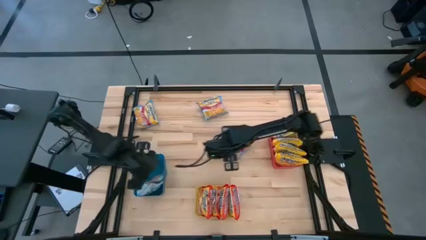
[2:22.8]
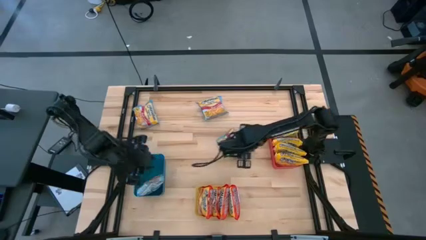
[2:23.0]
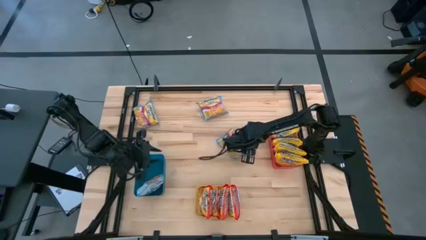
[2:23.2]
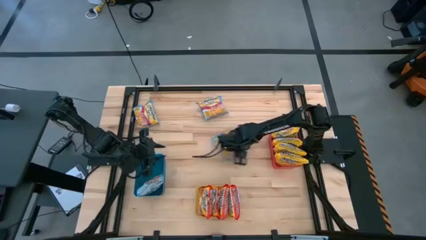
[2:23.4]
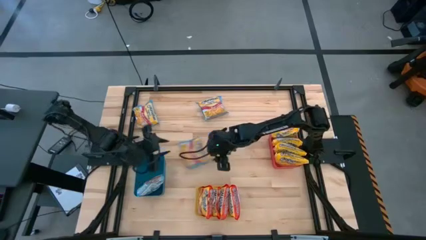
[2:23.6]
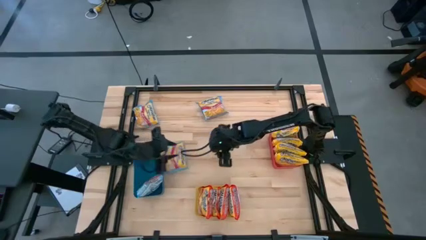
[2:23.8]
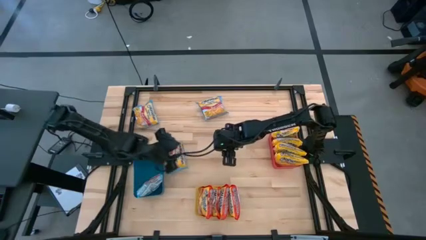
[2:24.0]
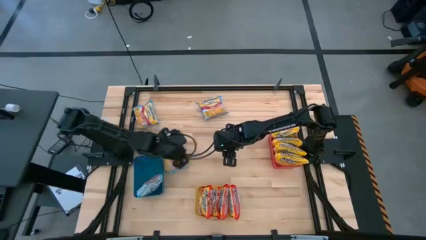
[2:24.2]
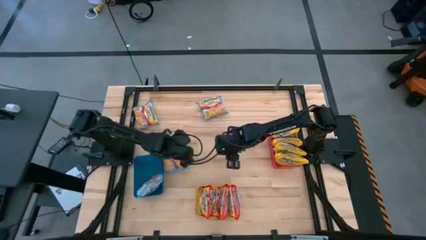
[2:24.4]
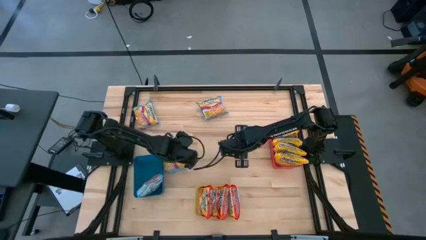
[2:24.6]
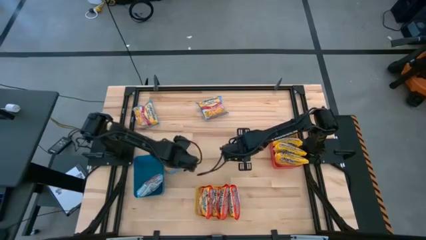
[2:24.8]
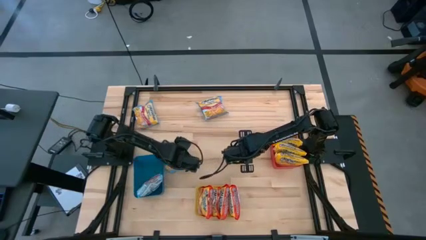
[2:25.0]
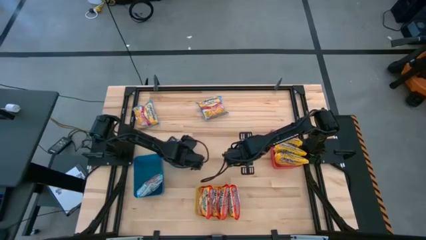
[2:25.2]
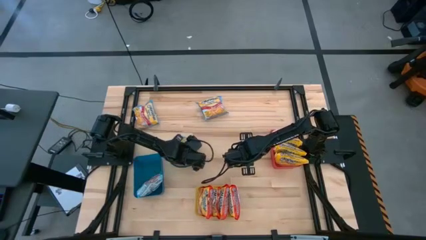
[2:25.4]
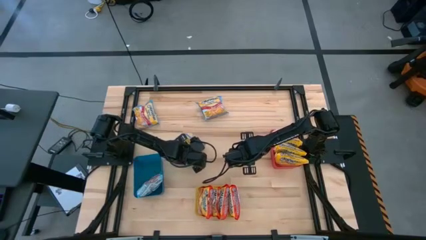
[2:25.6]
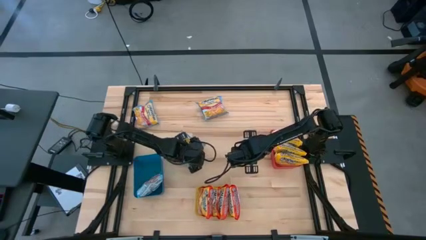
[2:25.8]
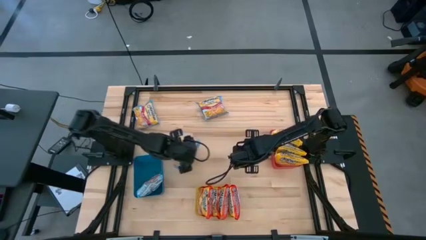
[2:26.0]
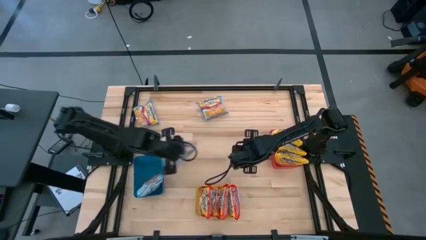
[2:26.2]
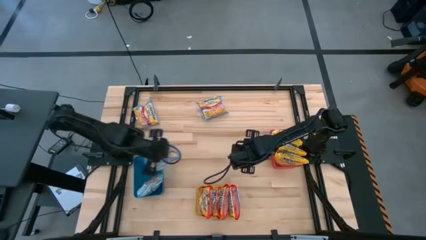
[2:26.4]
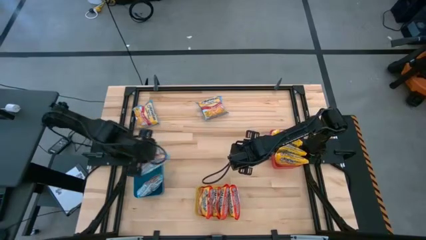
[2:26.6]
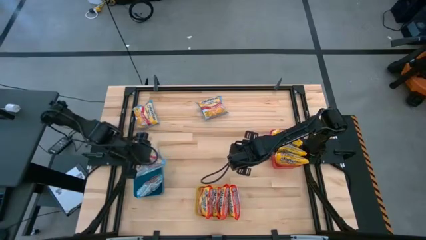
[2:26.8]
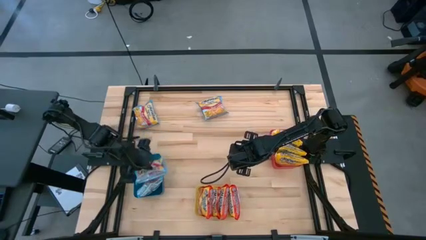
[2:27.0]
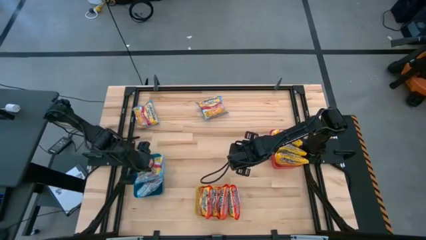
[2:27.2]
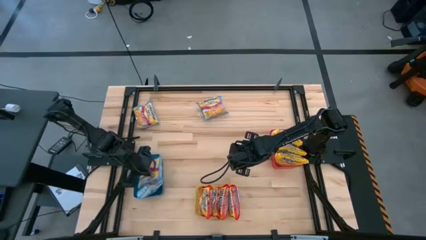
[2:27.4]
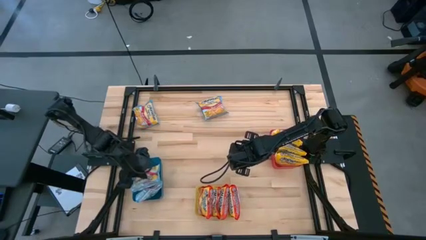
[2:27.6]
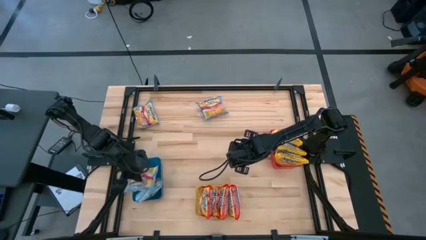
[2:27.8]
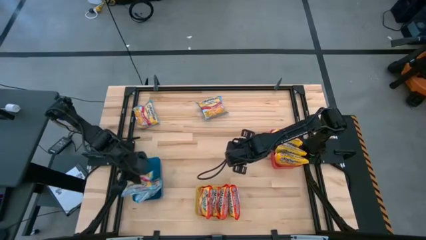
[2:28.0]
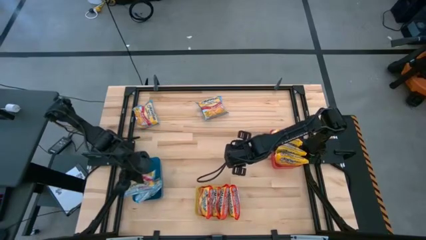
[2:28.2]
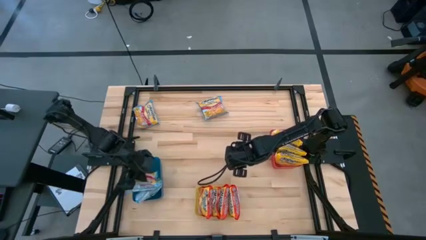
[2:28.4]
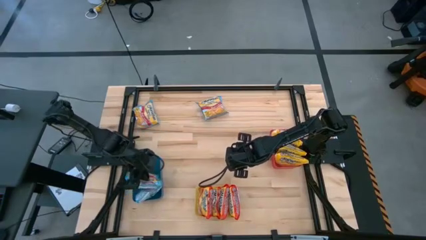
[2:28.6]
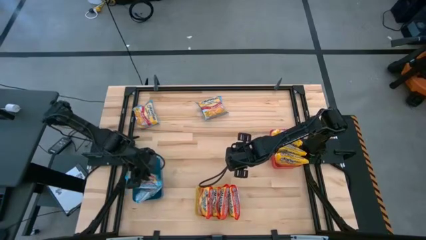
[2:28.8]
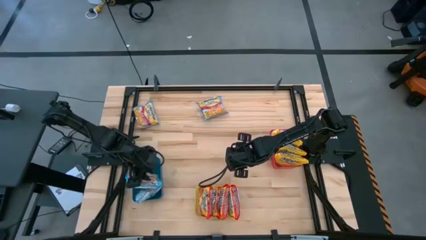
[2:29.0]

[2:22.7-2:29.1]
Task: Sort Maruchan noodles
Put the bottom right noodle pack into the blue bin

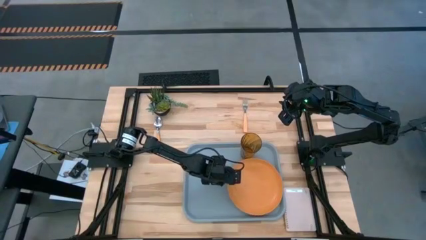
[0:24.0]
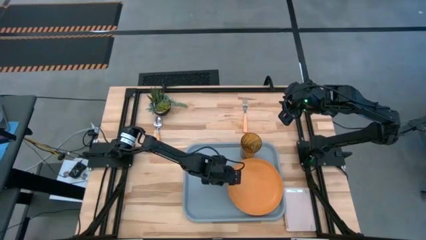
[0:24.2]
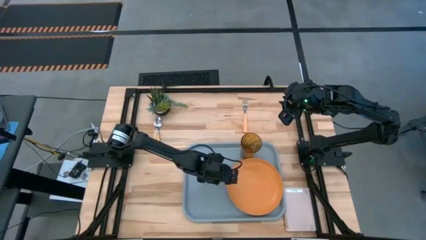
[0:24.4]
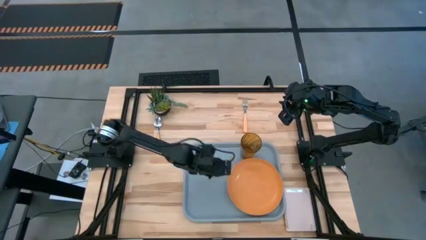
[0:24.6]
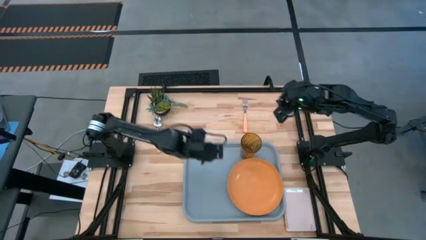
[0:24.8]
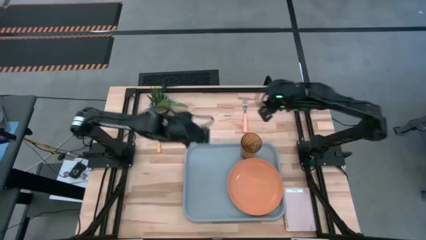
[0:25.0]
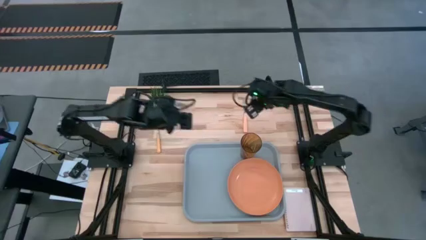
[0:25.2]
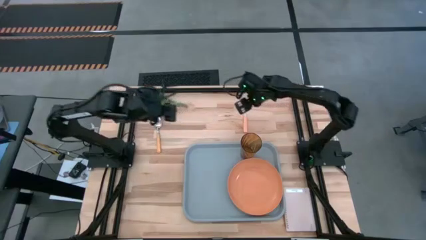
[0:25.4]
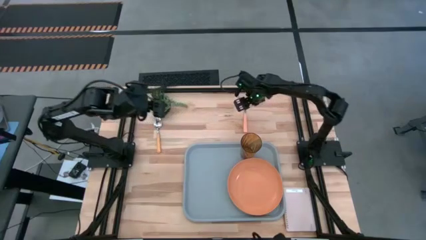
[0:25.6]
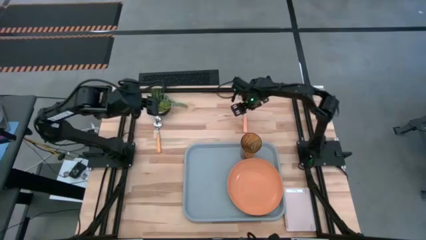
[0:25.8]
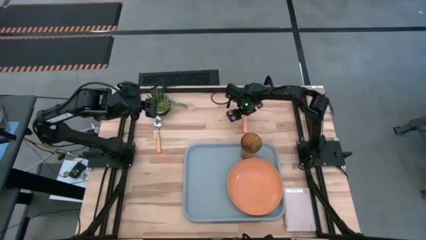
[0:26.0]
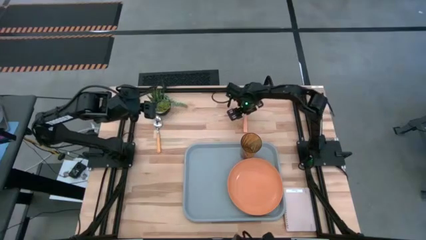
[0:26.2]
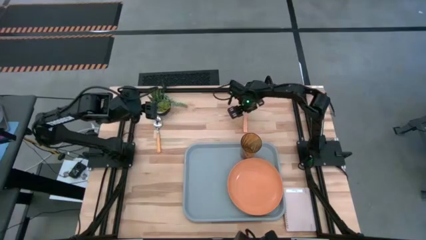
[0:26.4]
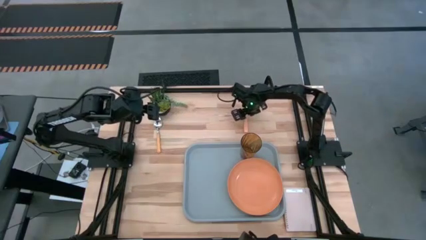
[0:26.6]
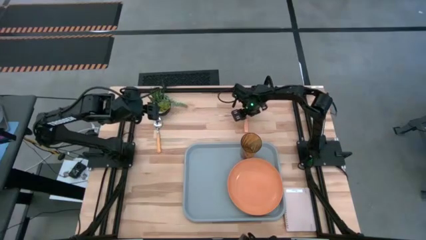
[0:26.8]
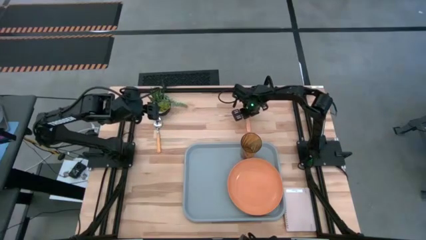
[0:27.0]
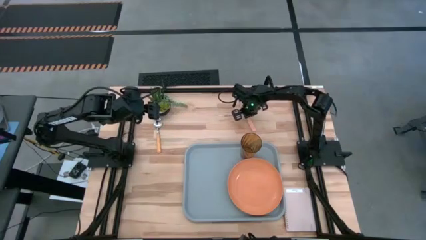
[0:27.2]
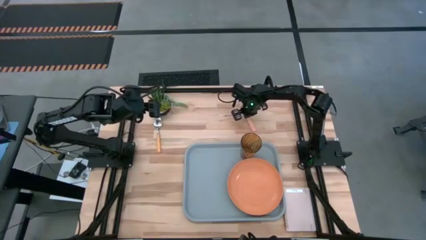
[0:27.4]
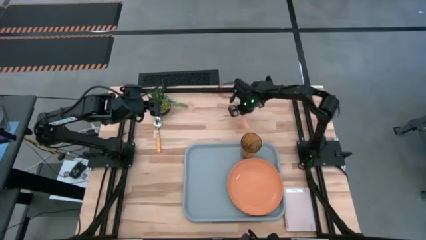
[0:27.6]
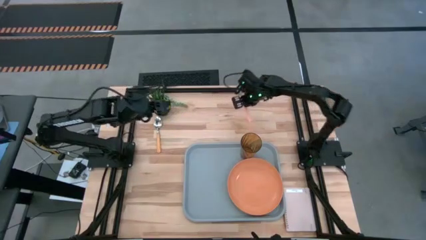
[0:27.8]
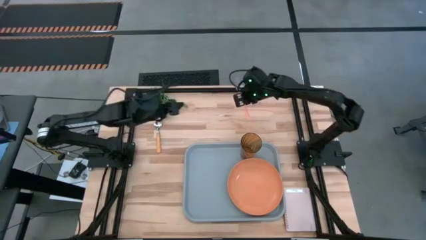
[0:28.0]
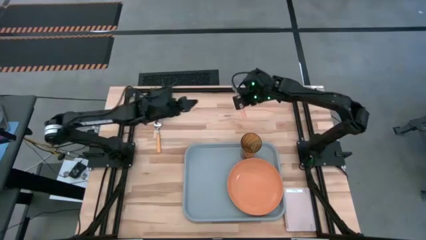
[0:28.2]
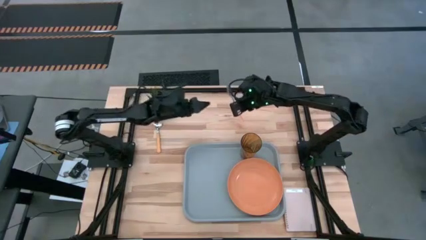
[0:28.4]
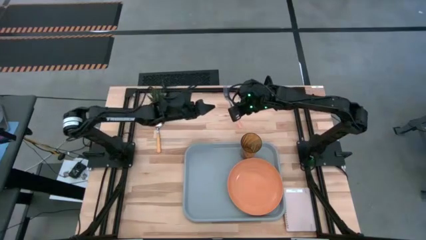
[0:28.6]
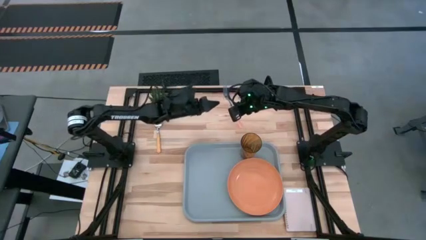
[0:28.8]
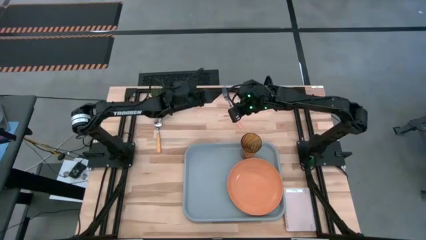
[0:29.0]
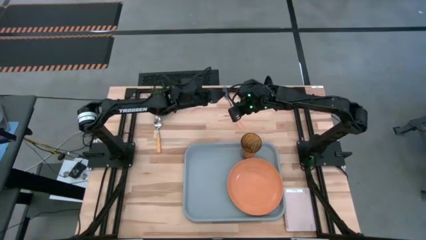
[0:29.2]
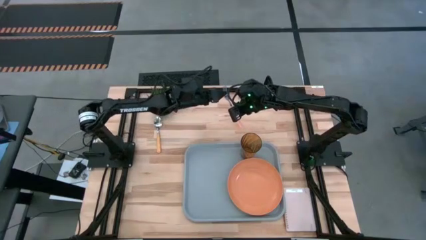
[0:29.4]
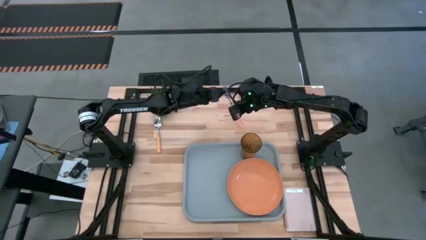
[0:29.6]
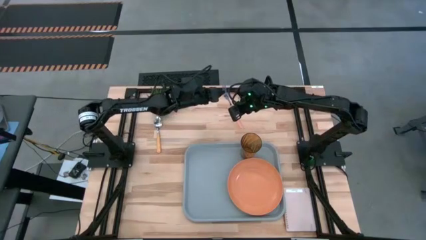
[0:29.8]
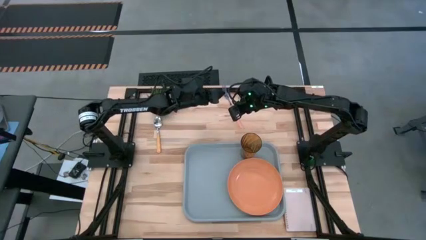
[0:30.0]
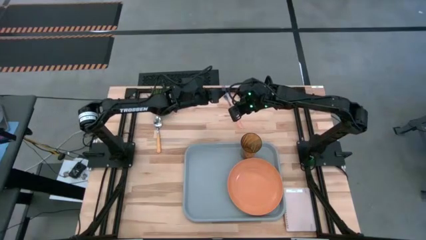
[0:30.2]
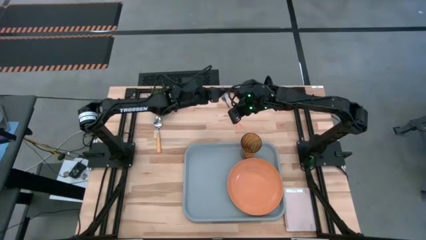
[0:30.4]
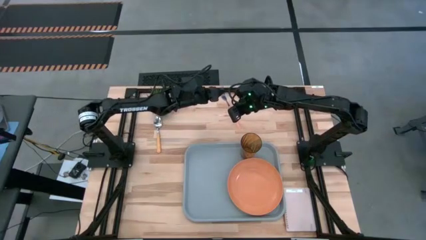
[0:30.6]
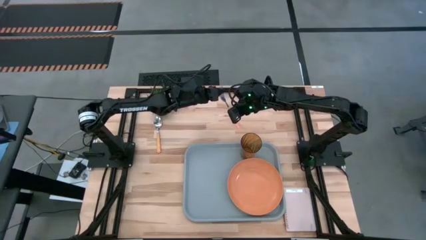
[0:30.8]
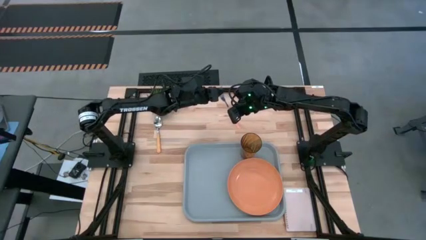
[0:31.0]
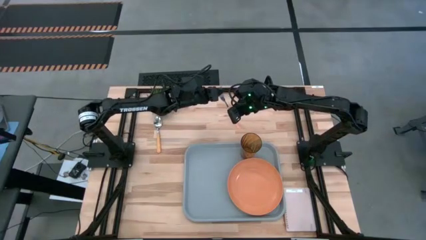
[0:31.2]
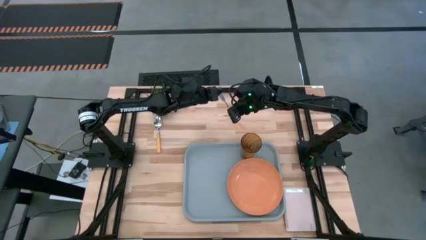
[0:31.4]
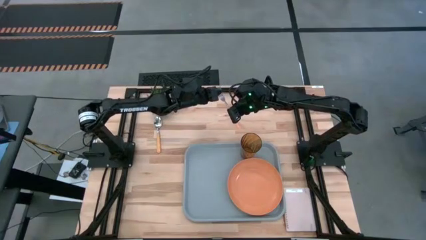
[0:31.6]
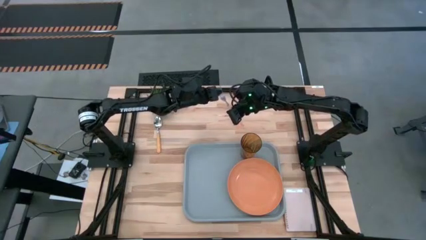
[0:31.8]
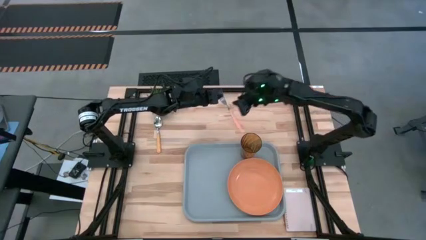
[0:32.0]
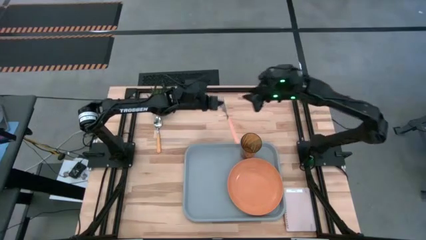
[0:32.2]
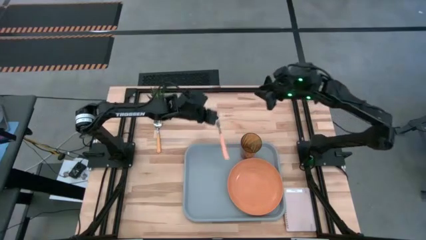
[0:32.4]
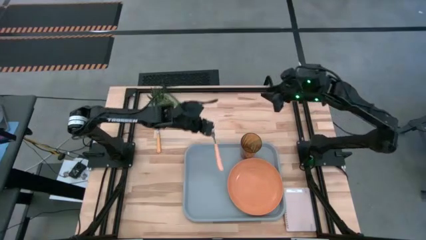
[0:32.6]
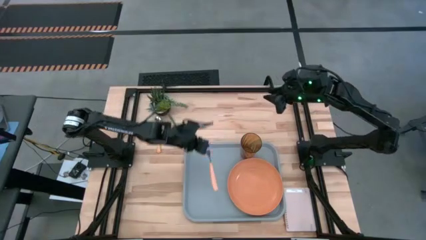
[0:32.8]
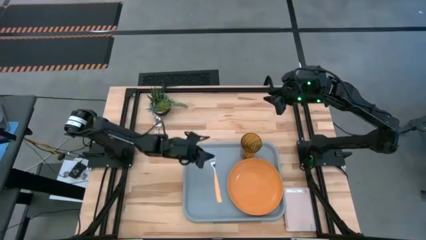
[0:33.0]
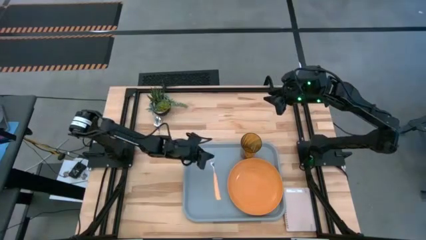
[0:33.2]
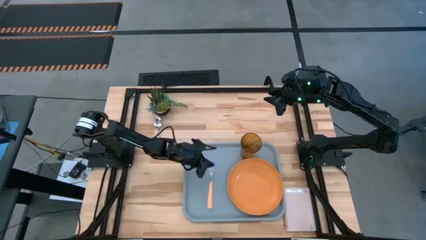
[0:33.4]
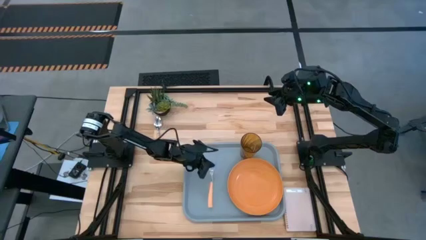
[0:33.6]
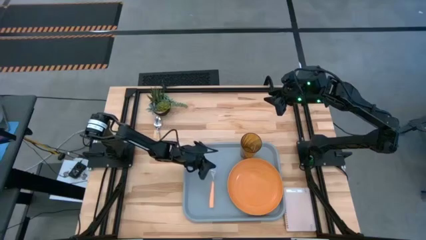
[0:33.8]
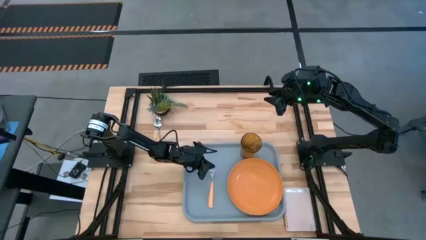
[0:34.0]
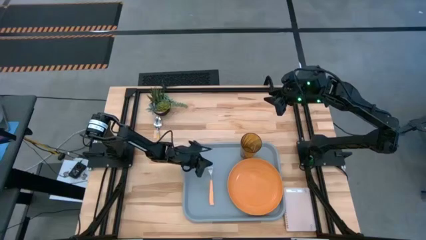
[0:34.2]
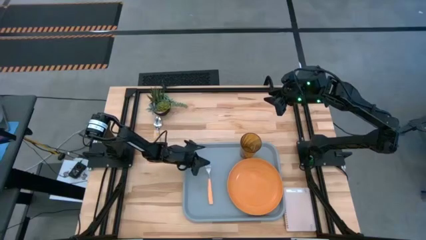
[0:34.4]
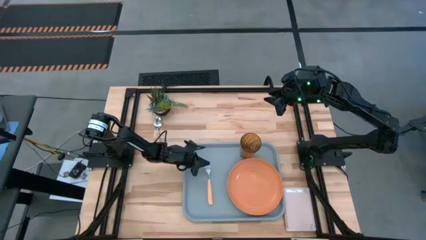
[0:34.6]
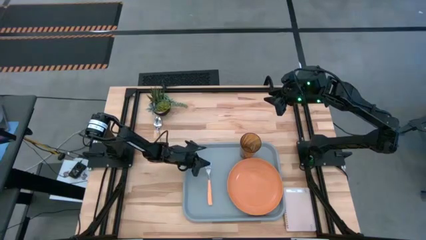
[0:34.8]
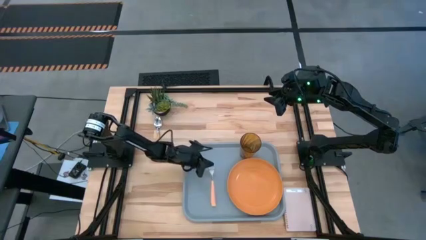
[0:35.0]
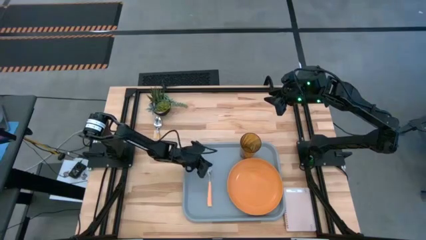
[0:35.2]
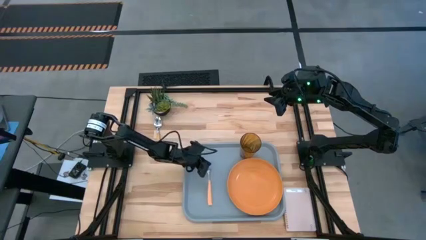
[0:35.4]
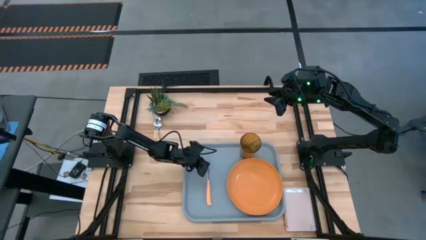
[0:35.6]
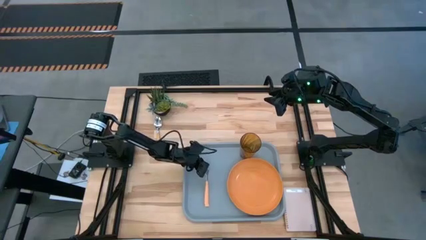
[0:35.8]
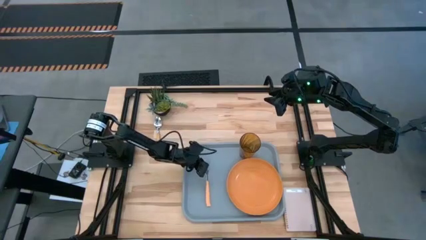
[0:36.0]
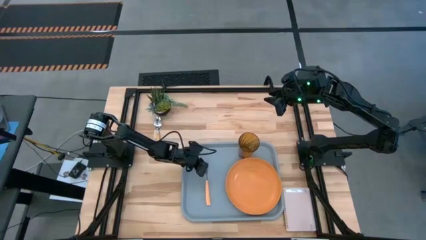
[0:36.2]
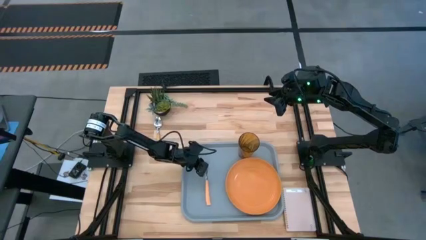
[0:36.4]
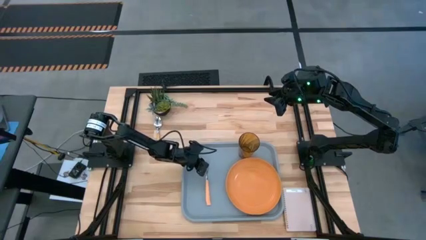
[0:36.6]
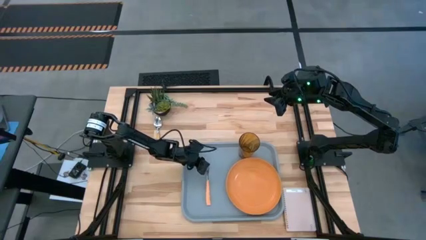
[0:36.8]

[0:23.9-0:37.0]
Task: Pick and place plate/cup/fork/spoon on tray
Put the orange fork on the gray tray to the left of the orange plate
